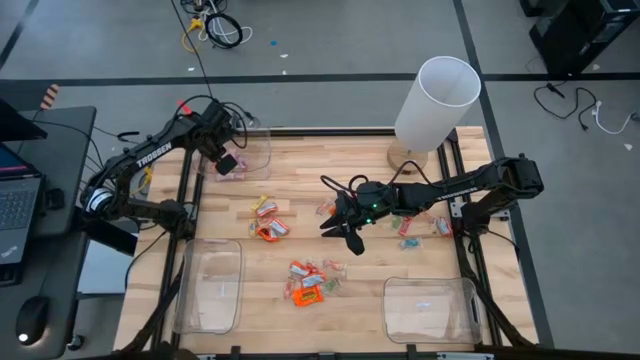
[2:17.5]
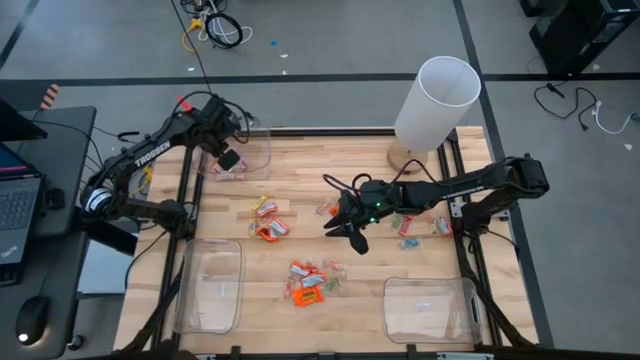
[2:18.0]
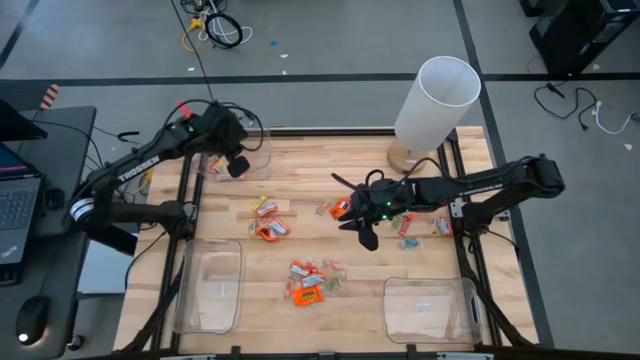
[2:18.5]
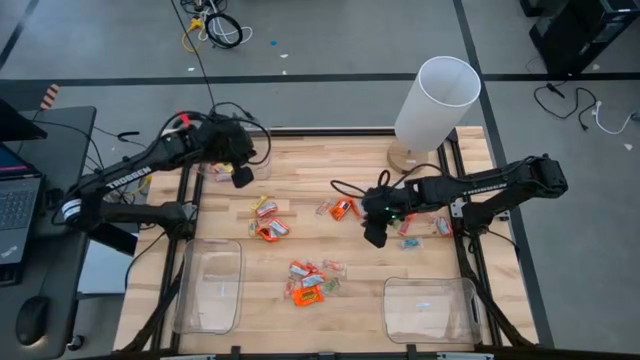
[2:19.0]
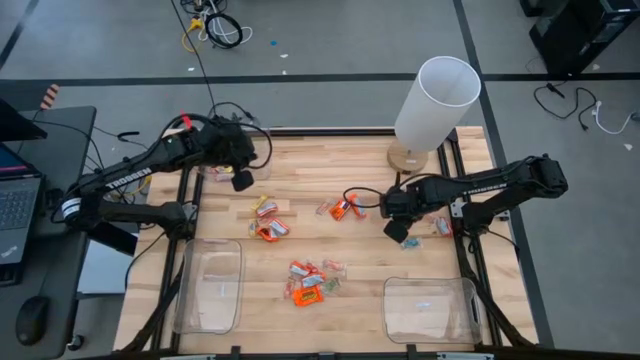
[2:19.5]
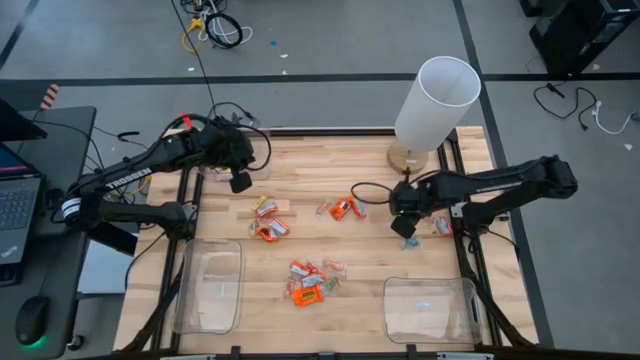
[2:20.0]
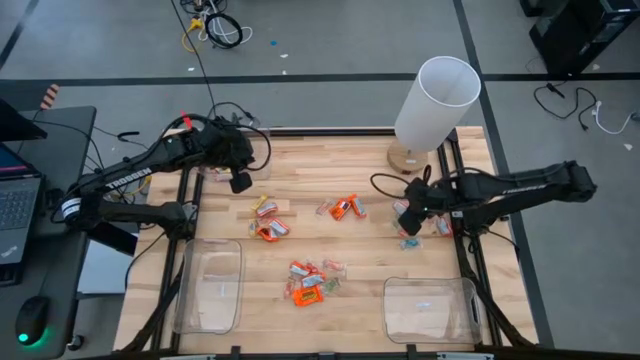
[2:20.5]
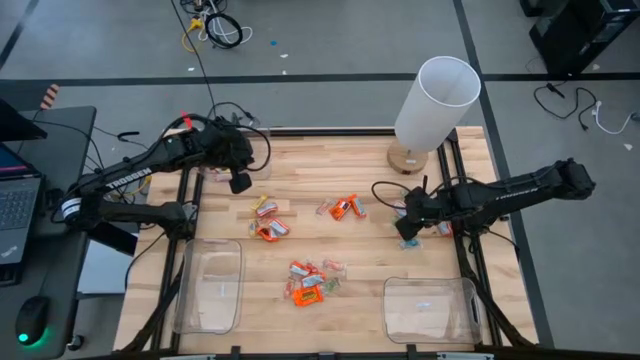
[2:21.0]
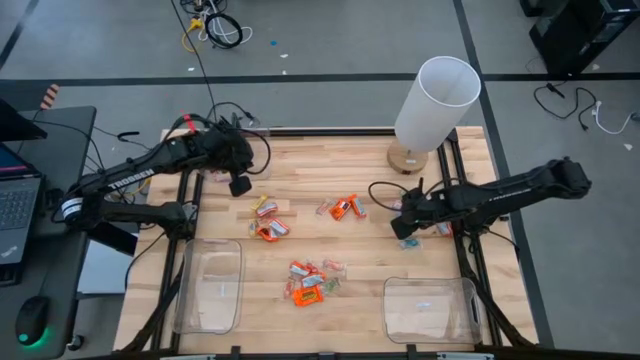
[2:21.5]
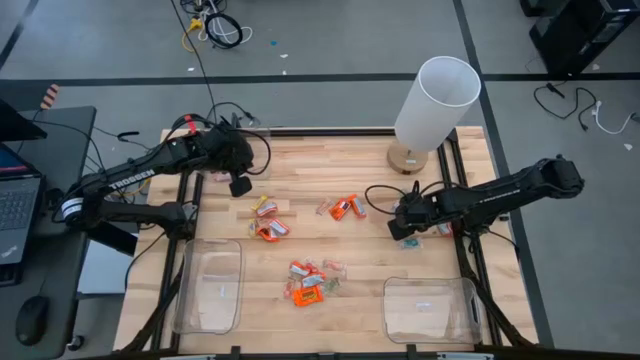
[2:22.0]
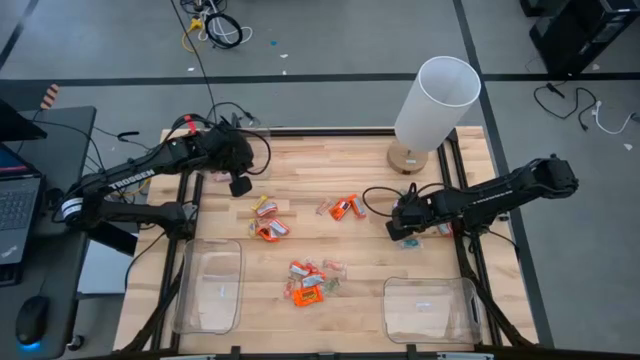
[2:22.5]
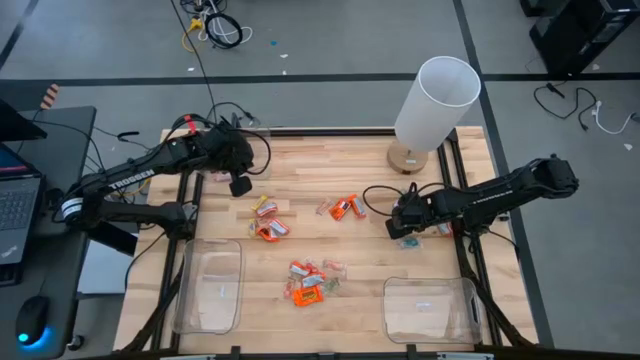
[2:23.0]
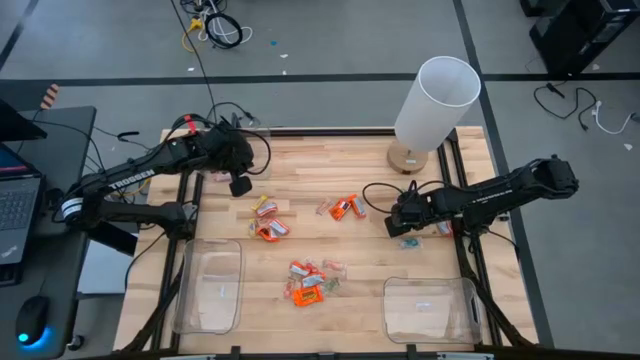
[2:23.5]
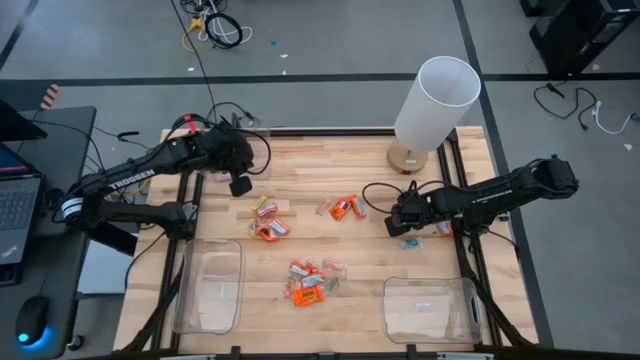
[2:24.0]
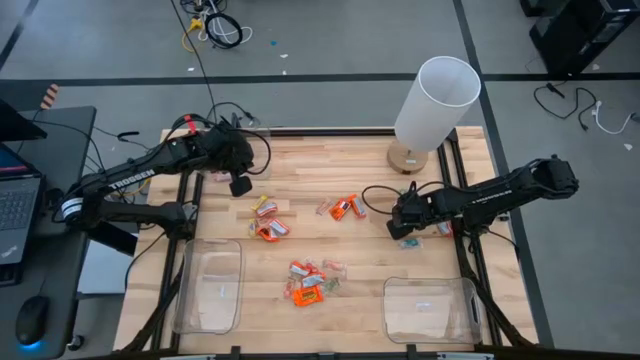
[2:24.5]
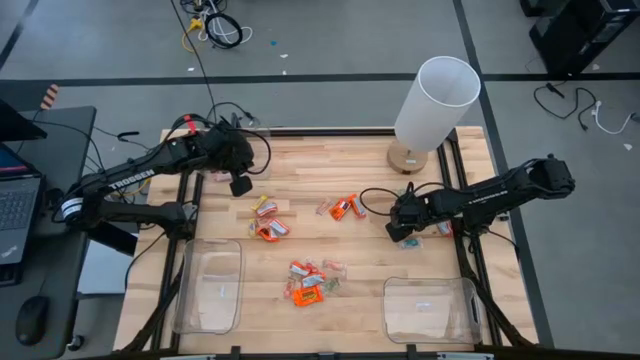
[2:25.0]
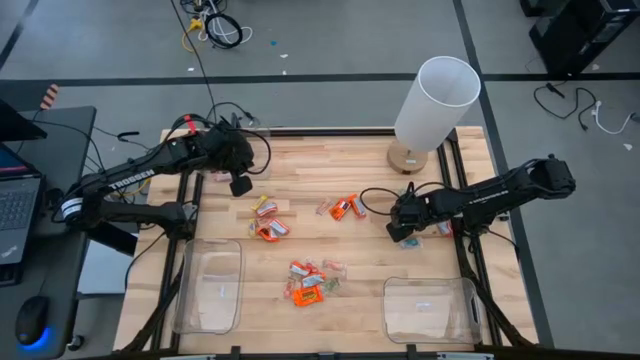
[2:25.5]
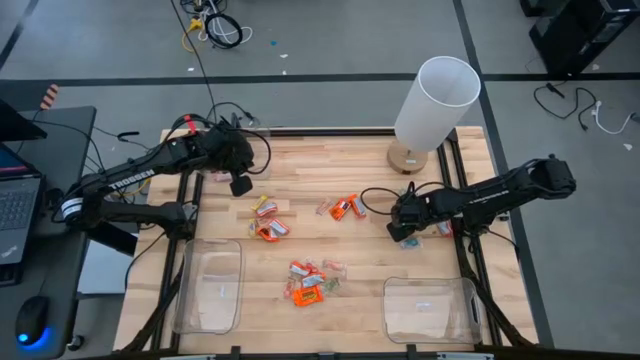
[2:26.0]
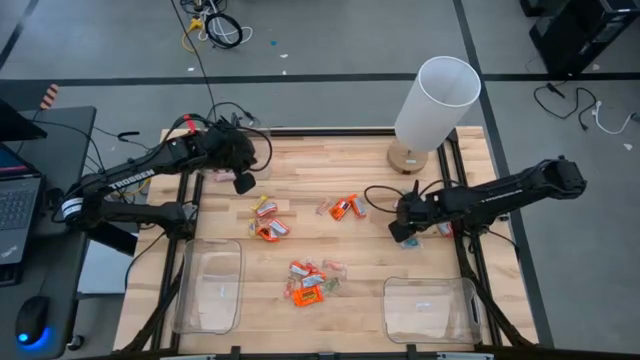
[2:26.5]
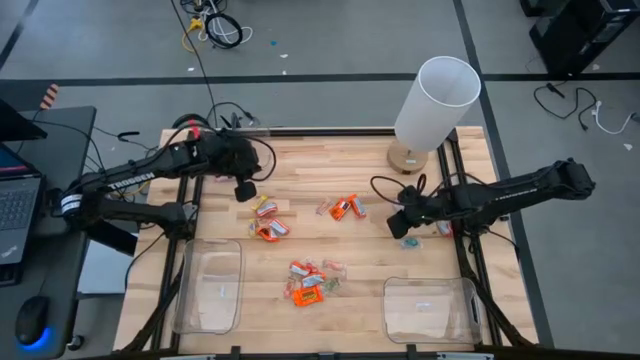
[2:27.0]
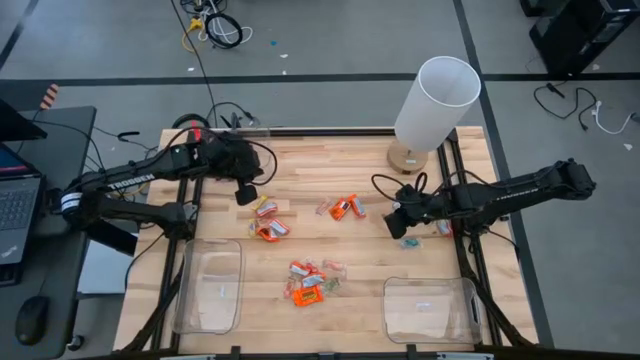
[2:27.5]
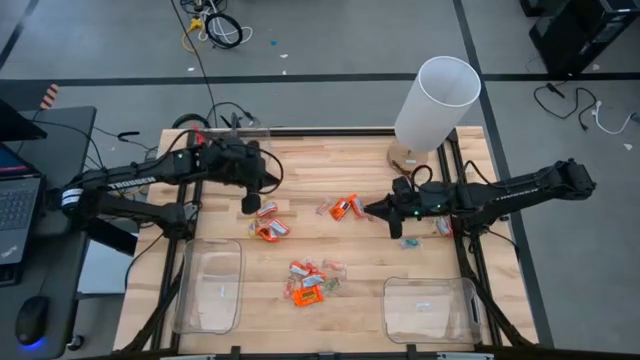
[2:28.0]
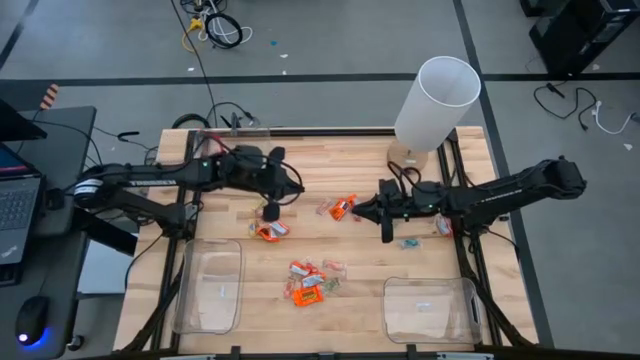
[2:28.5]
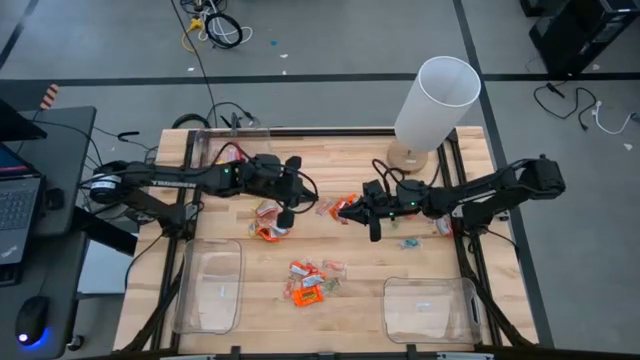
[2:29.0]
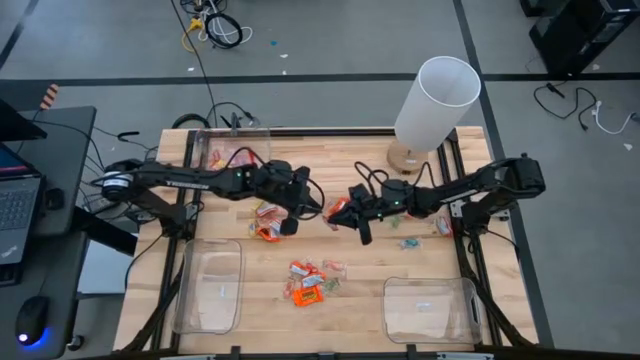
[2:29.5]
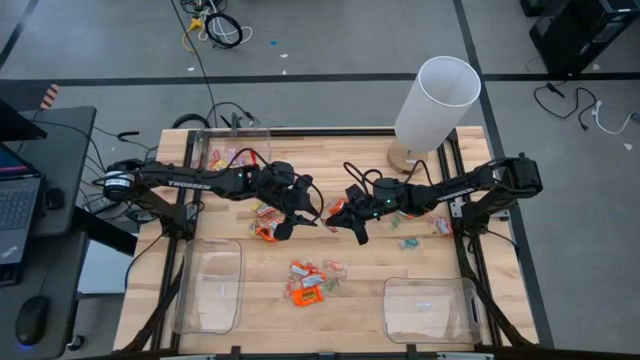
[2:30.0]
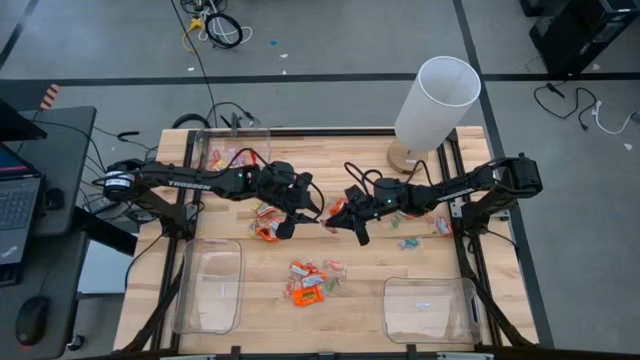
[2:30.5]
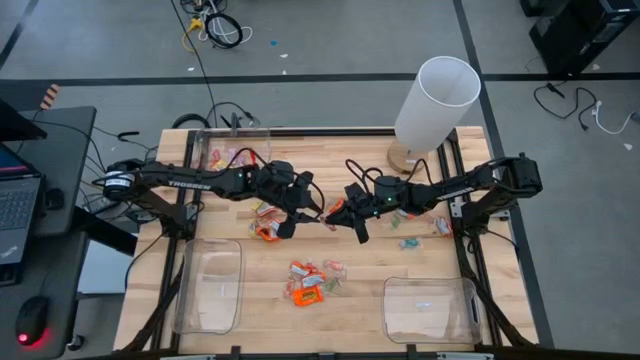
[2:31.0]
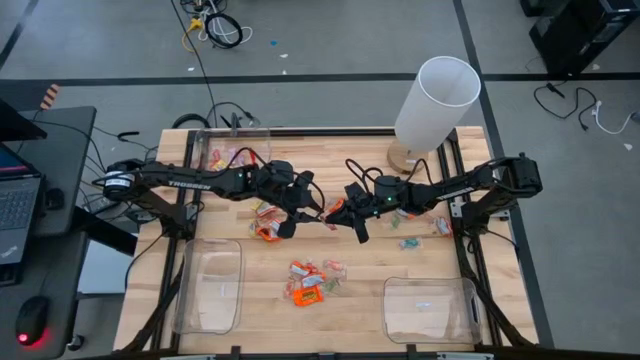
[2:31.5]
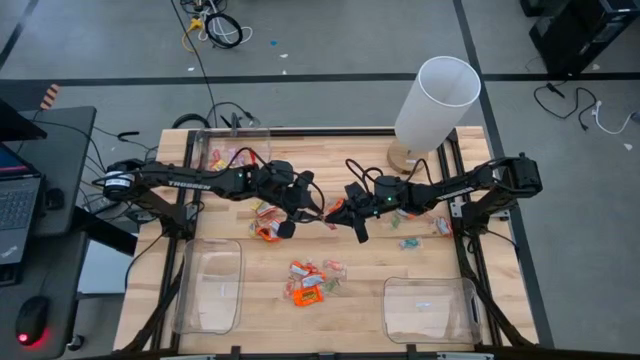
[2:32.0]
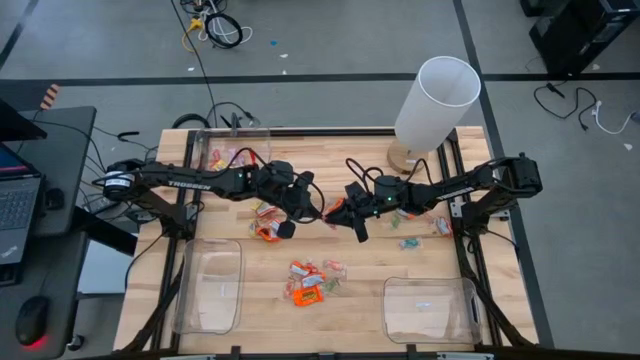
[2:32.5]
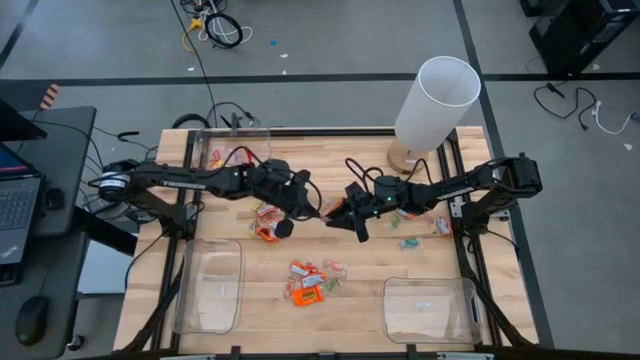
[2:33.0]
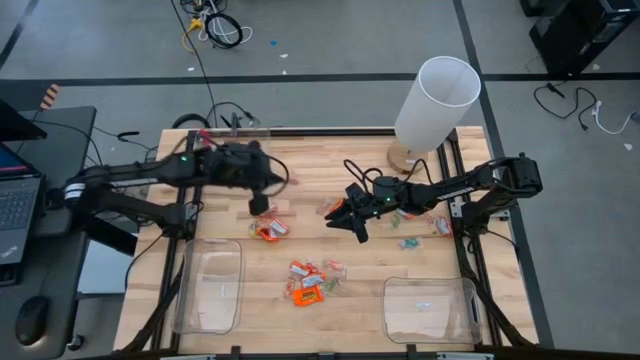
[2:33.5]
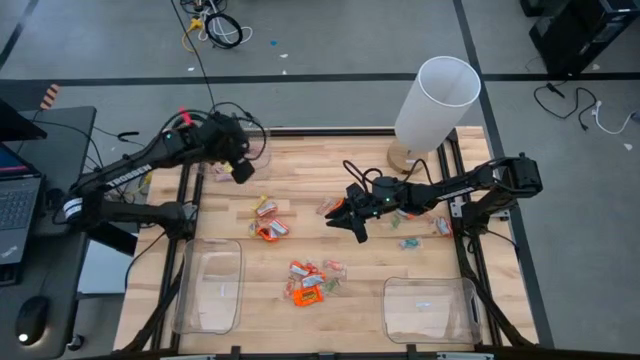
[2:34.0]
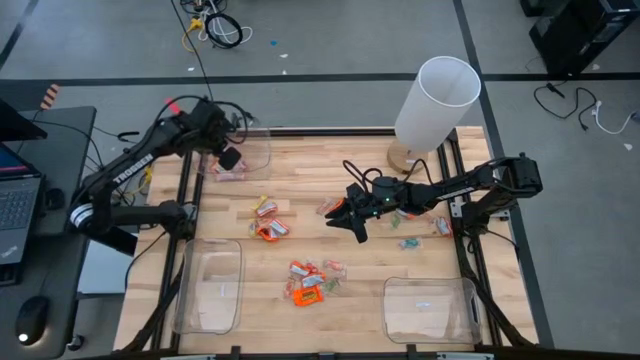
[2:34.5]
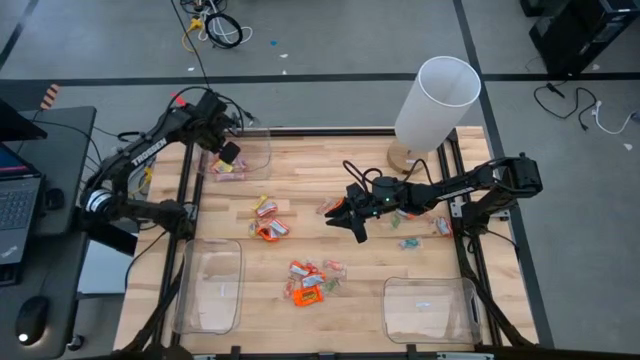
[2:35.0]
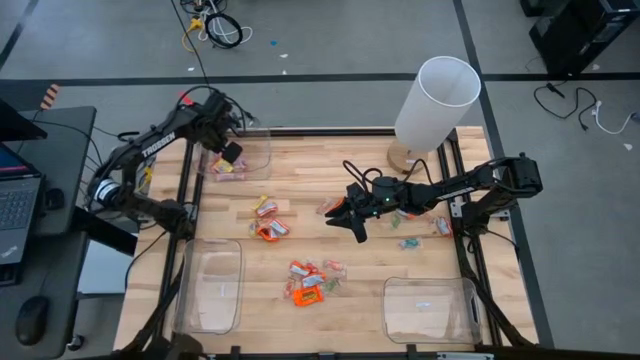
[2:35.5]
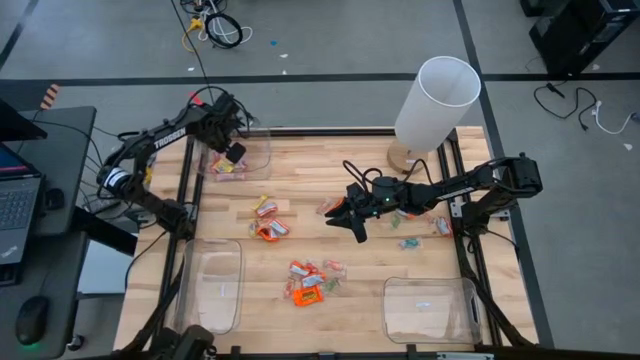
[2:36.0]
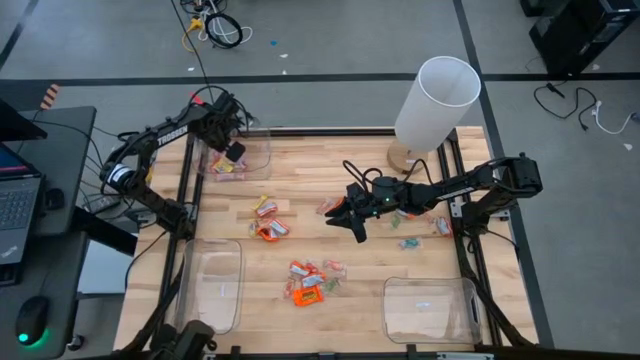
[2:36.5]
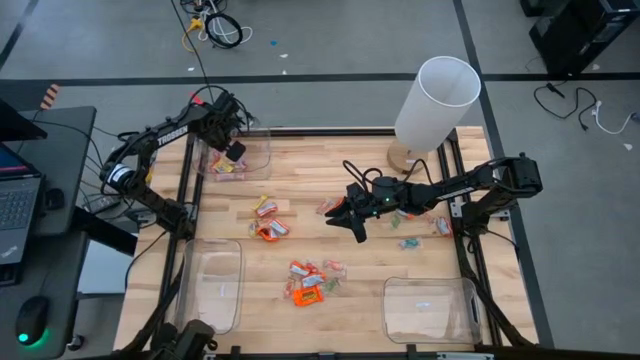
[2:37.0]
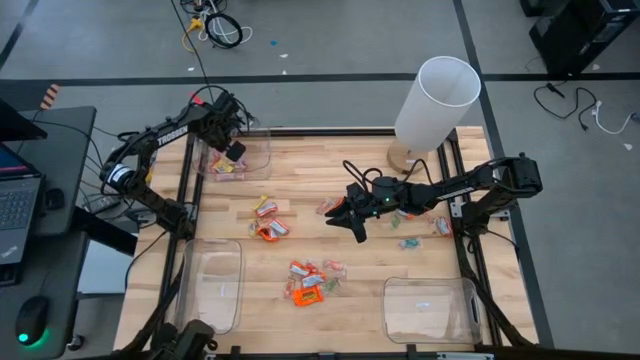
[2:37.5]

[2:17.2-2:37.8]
Task: Sort candy
Put the red candy into the top left transparent bin

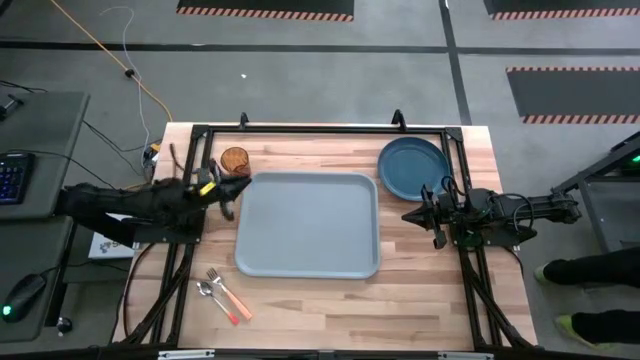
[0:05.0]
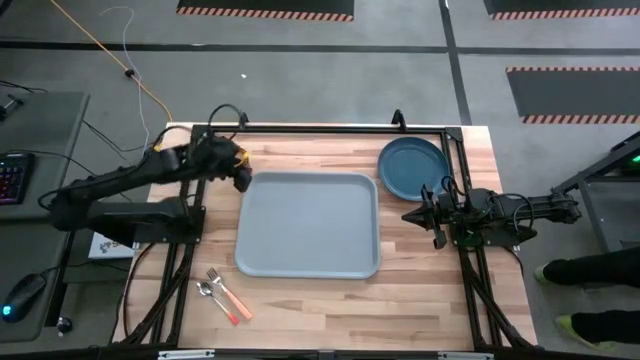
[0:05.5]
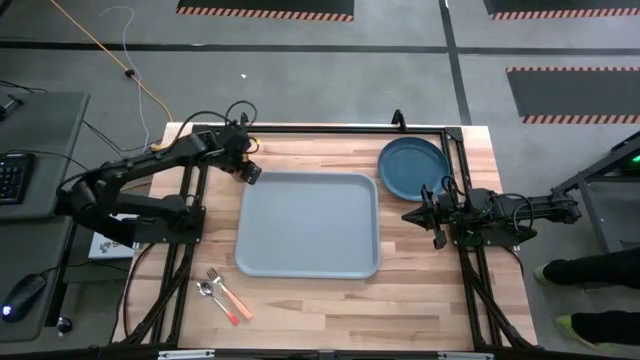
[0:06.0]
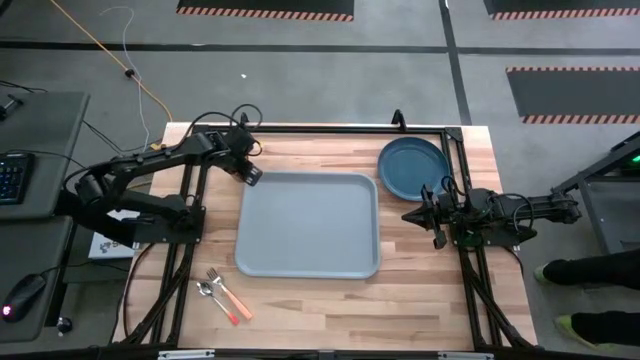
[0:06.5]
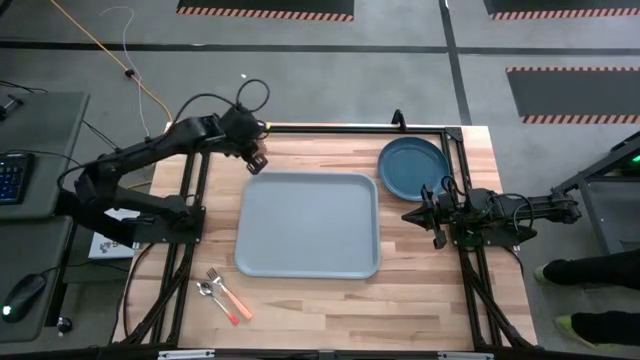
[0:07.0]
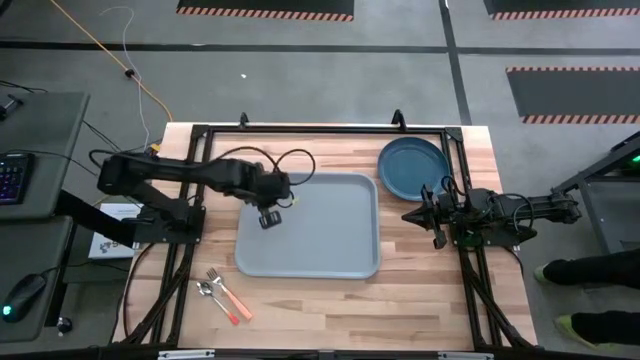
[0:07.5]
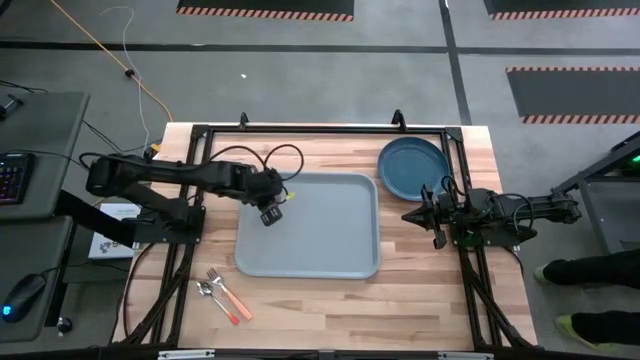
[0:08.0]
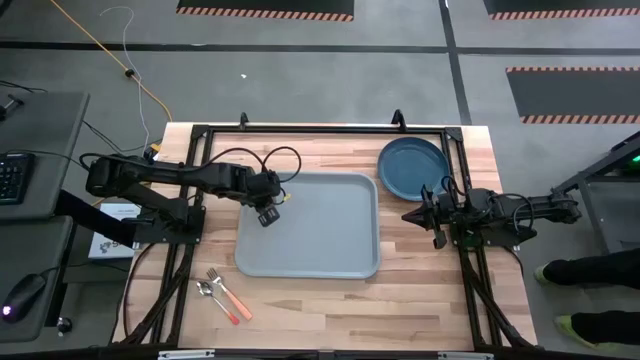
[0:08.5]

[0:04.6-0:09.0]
Task: Pick and place plate/cup/fork/spoon on tray
Put the brown glass on the blue tray
